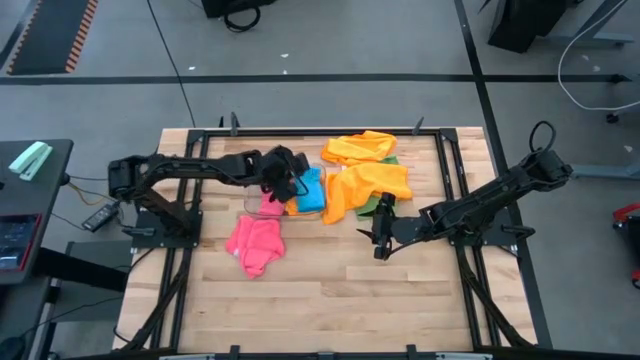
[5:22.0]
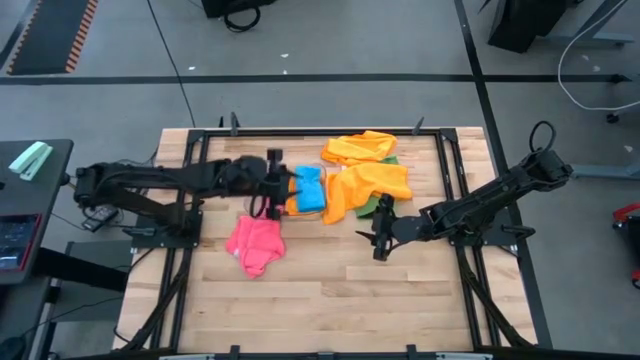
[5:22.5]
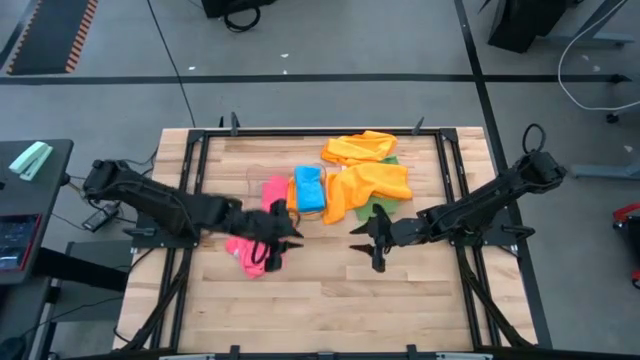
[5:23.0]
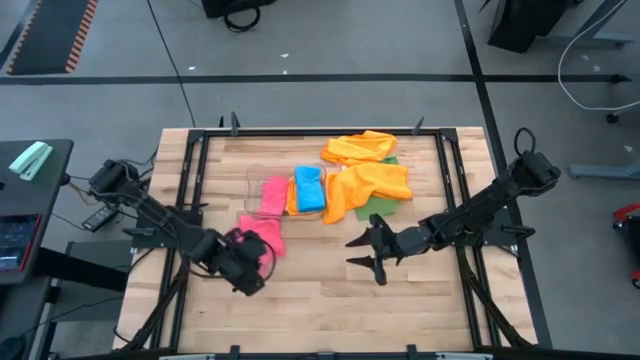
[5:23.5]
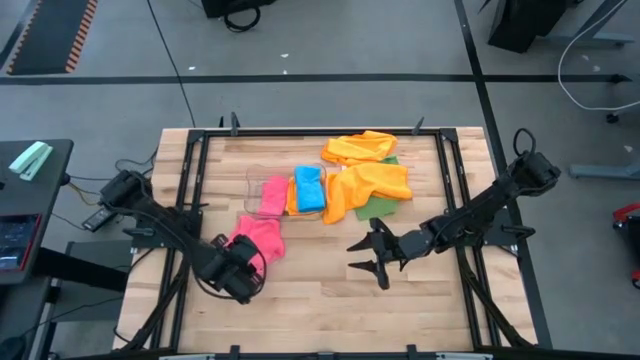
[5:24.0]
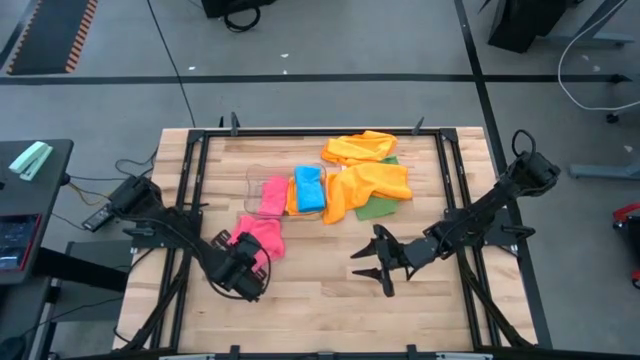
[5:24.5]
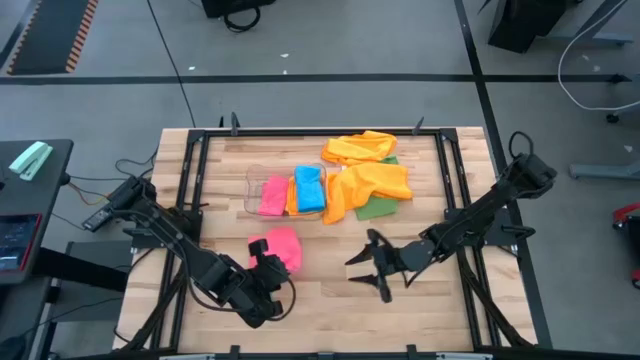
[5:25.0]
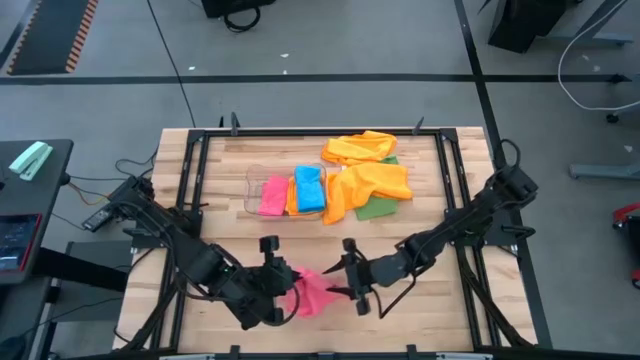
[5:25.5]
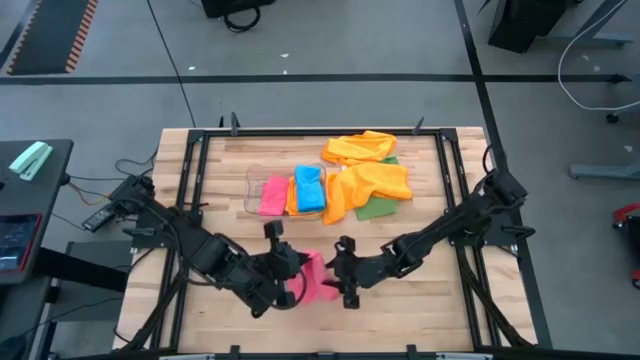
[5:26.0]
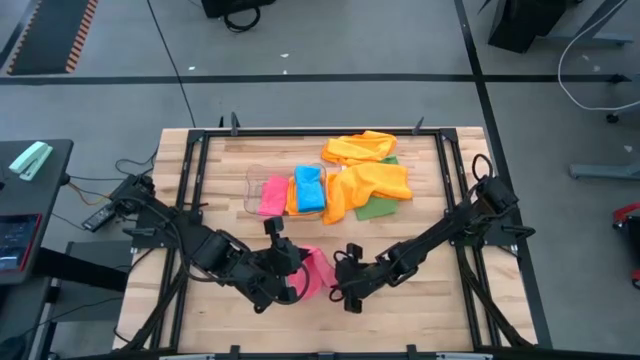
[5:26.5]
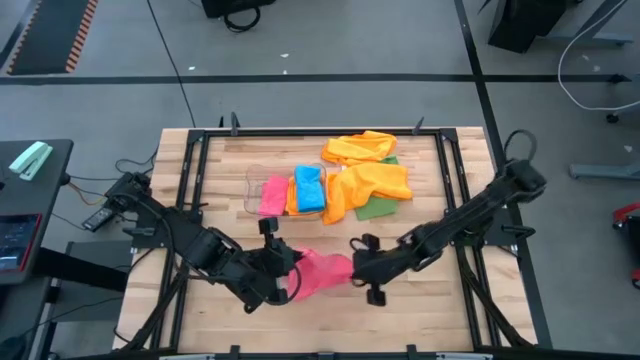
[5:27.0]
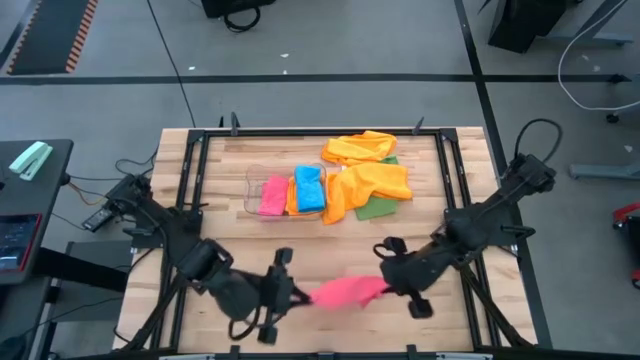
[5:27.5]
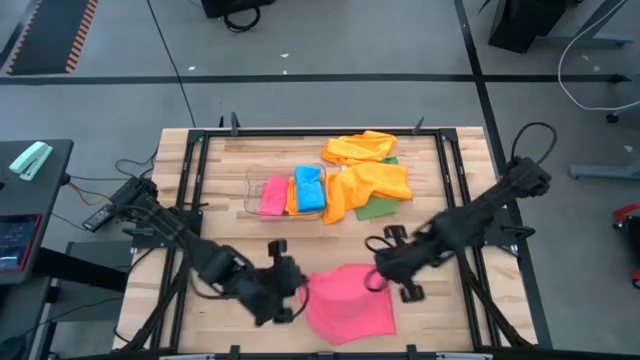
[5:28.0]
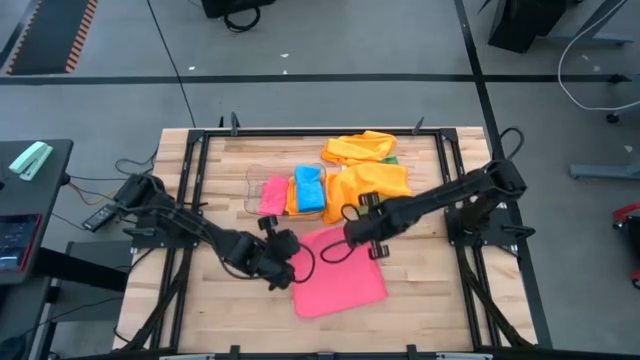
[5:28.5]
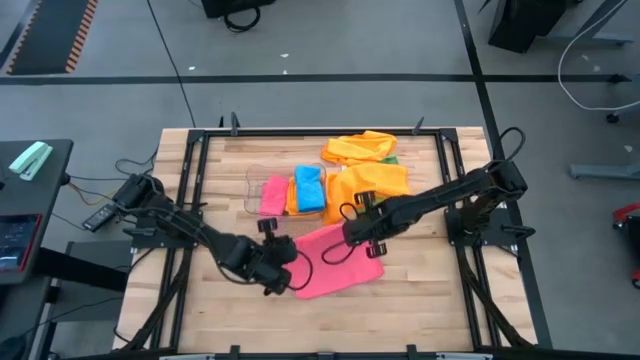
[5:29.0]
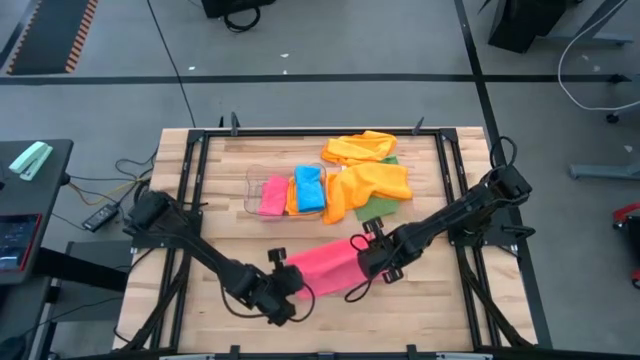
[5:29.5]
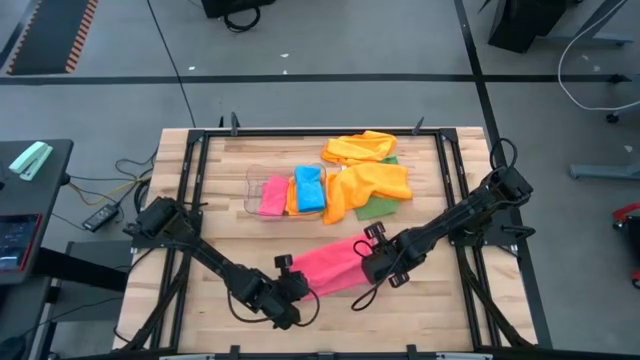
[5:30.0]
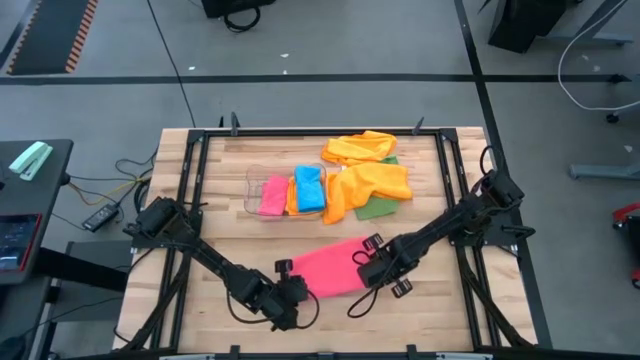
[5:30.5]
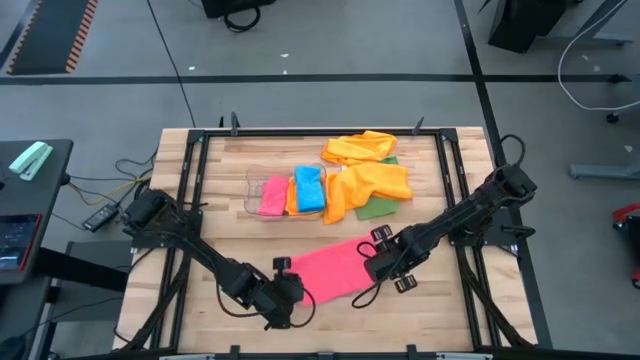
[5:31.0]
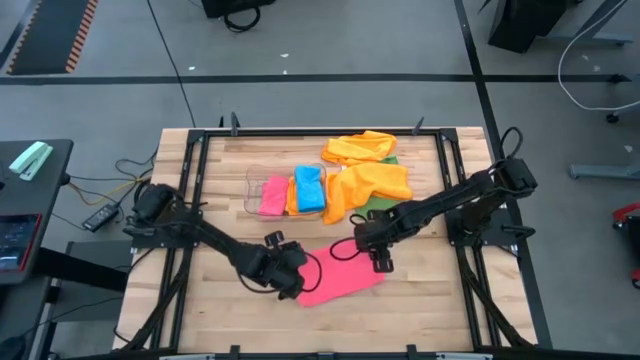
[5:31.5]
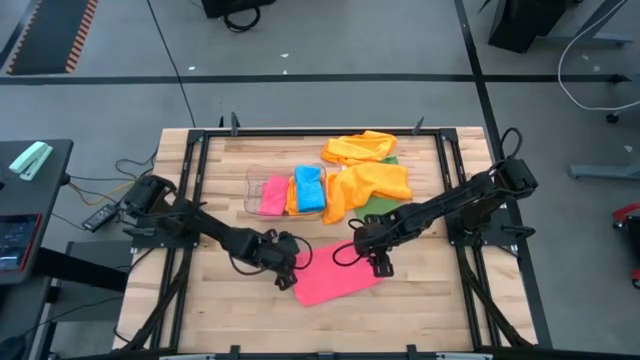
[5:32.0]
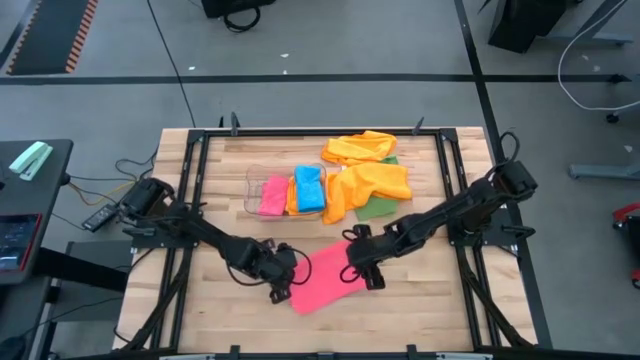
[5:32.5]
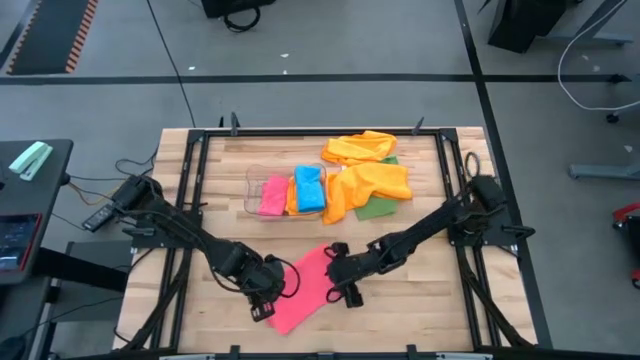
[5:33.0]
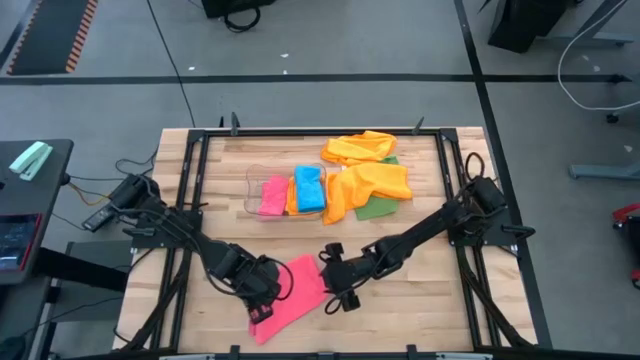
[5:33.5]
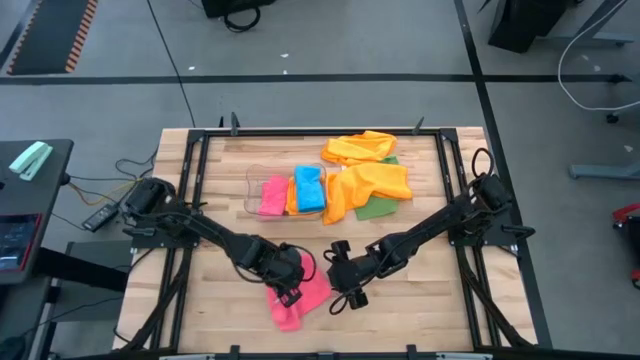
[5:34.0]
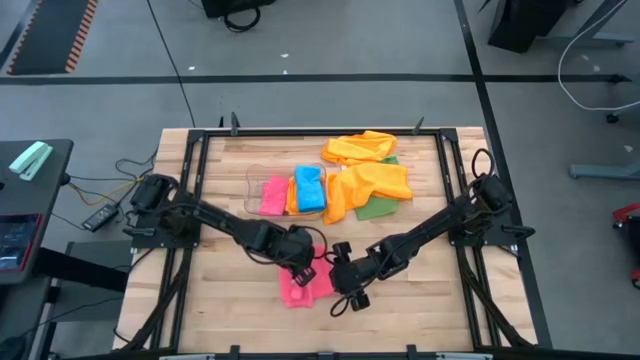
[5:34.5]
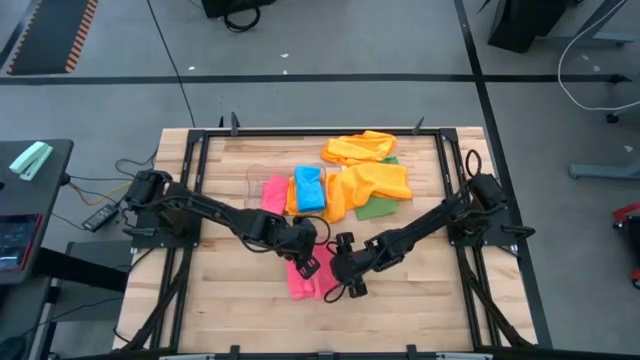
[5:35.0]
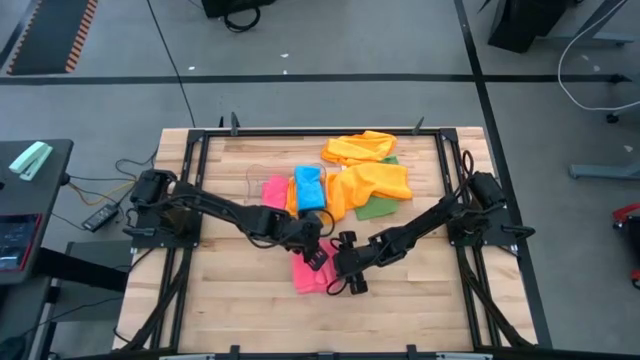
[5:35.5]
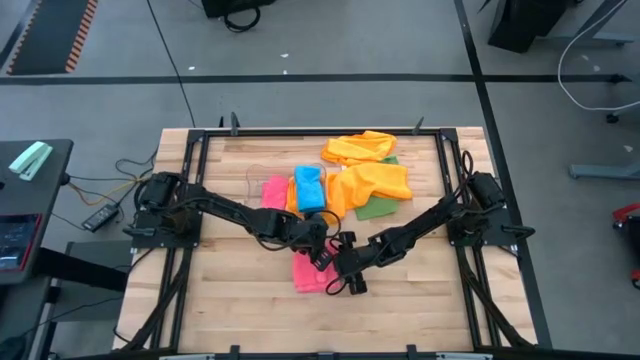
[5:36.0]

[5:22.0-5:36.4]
Task: Fold microfiber towels
Fold the pink microfiber cloth
